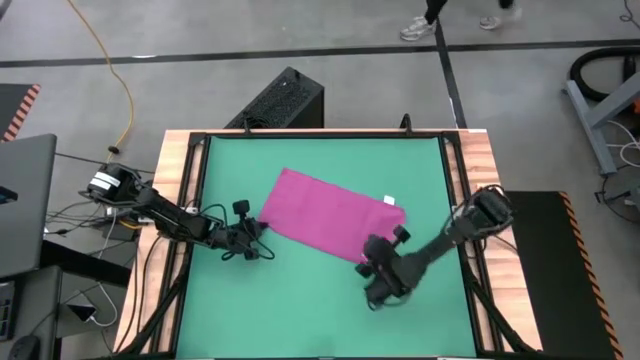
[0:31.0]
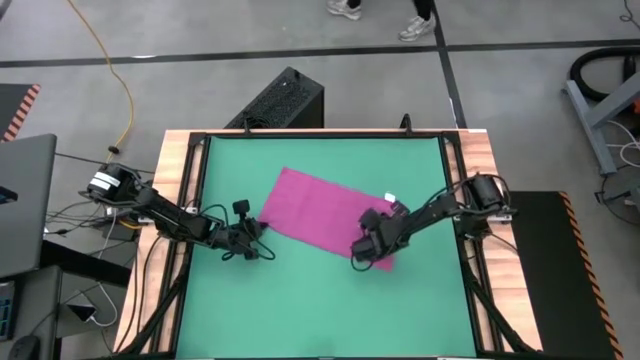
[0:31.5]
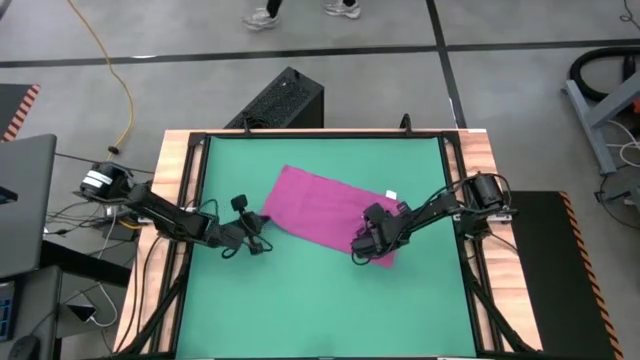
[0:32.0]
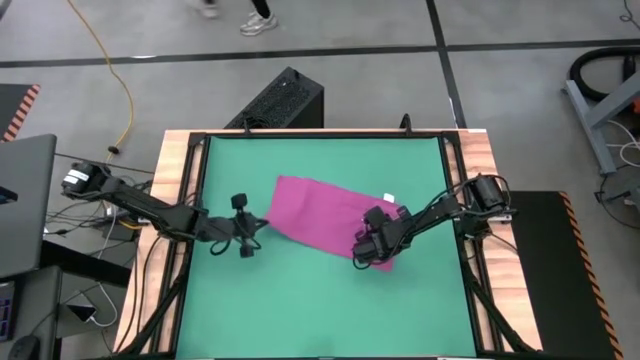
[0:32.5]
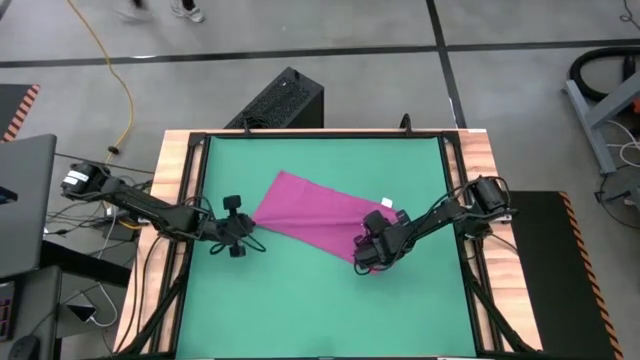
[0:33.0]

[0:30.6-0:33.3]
Task: Roll towel into tight, uniform cylinder
Roll the pink towel

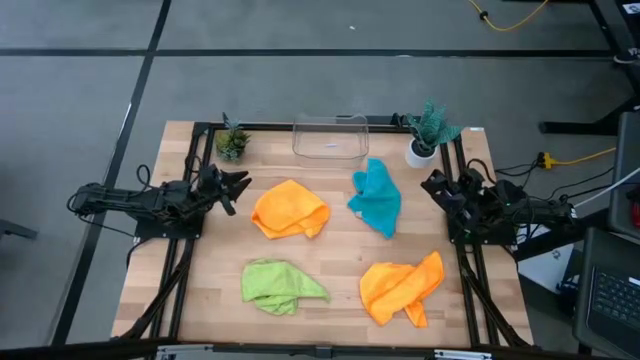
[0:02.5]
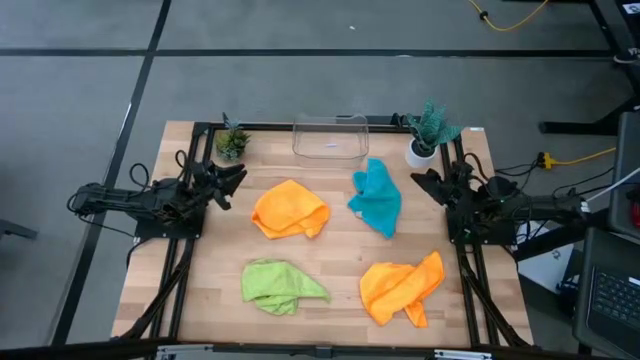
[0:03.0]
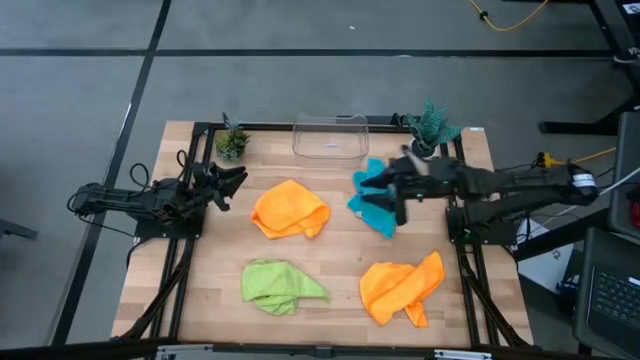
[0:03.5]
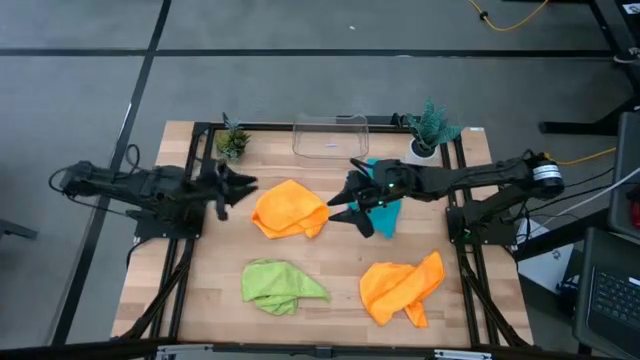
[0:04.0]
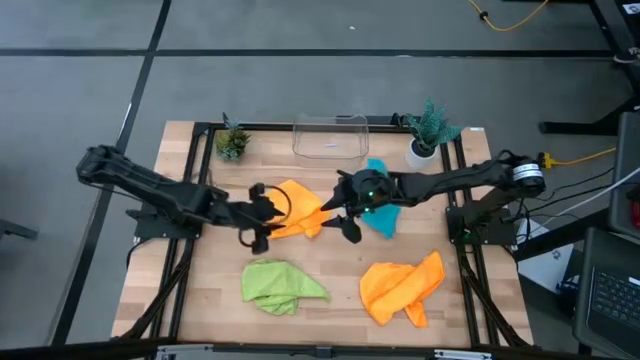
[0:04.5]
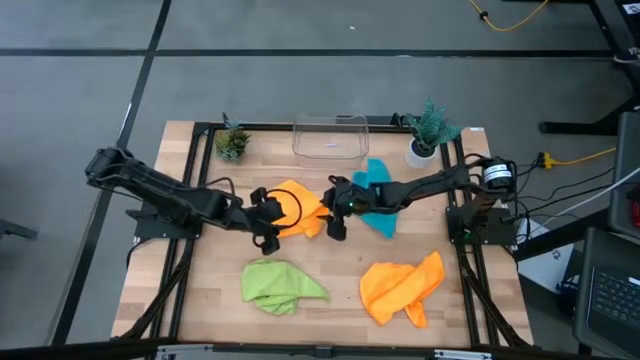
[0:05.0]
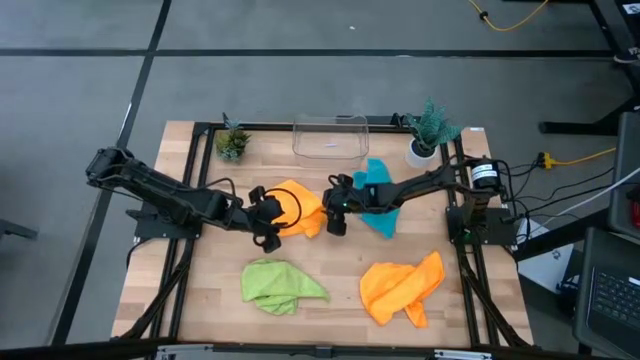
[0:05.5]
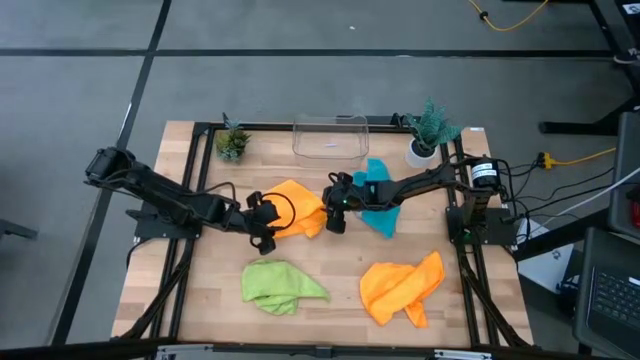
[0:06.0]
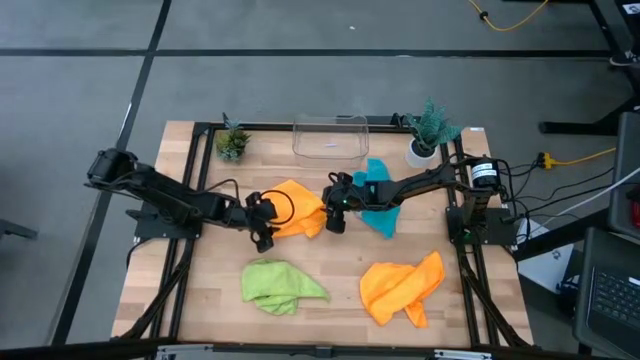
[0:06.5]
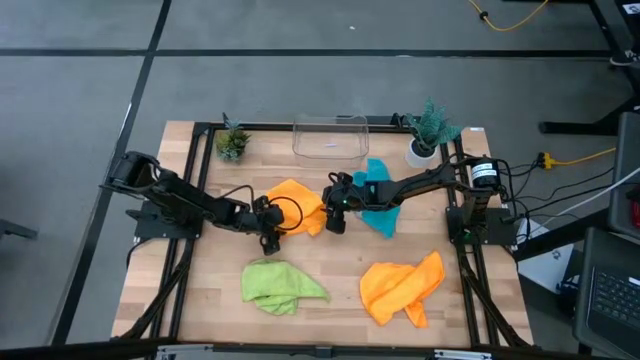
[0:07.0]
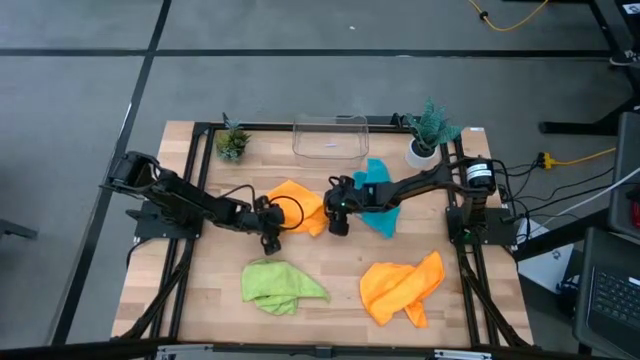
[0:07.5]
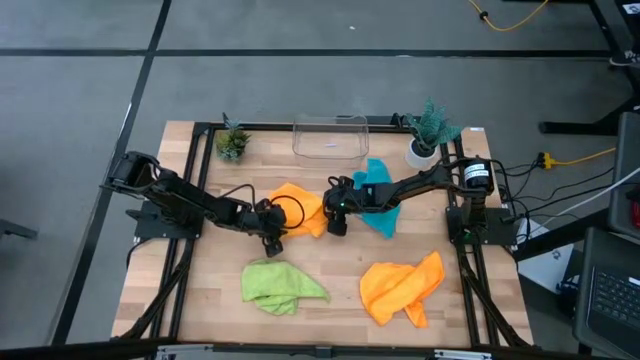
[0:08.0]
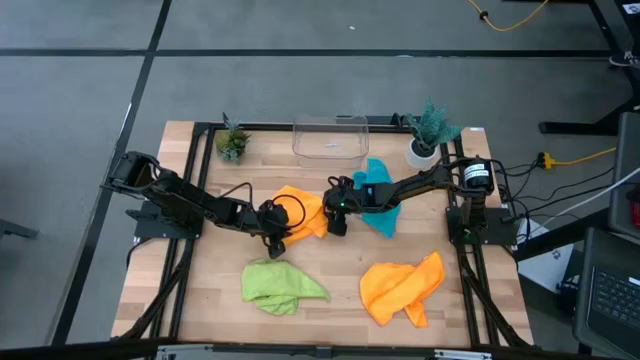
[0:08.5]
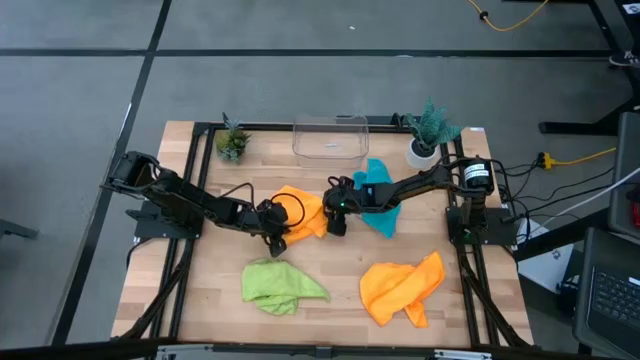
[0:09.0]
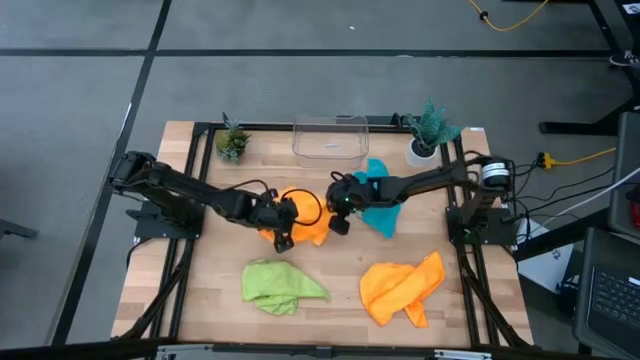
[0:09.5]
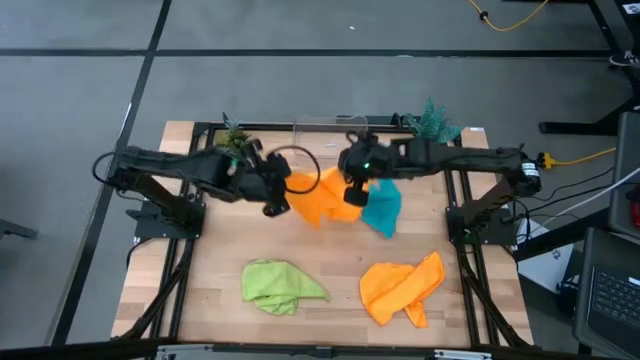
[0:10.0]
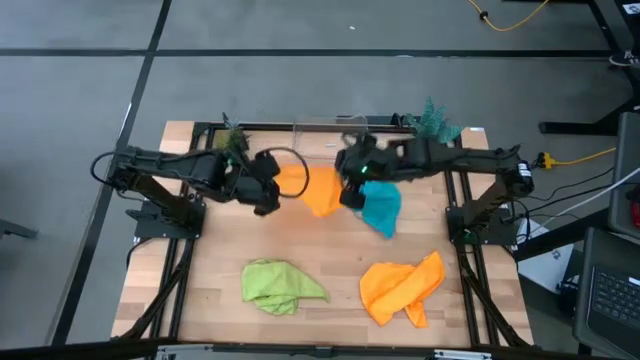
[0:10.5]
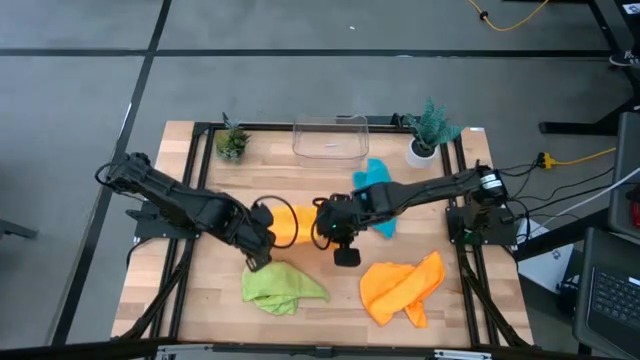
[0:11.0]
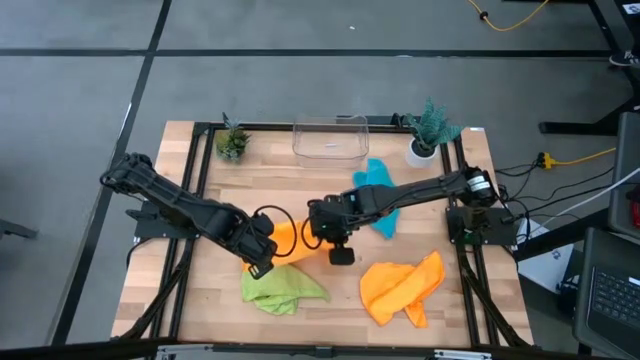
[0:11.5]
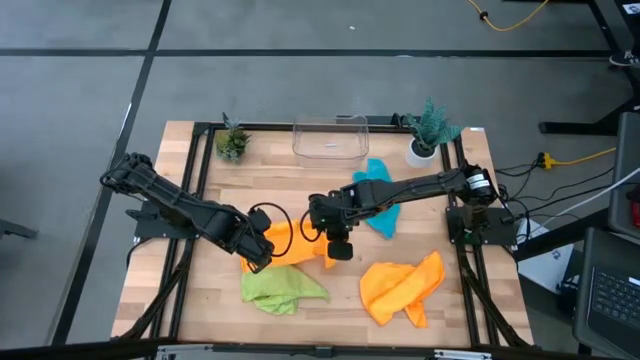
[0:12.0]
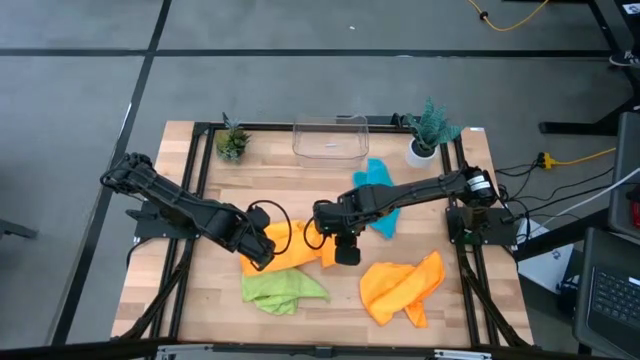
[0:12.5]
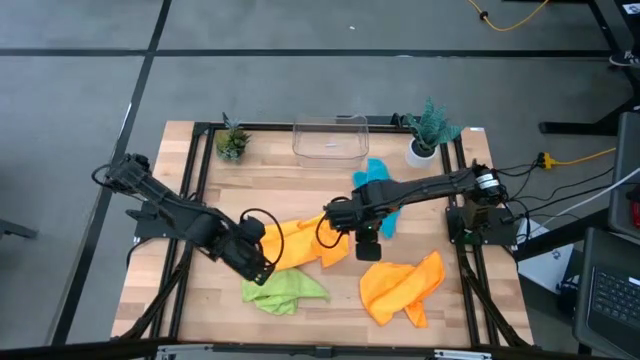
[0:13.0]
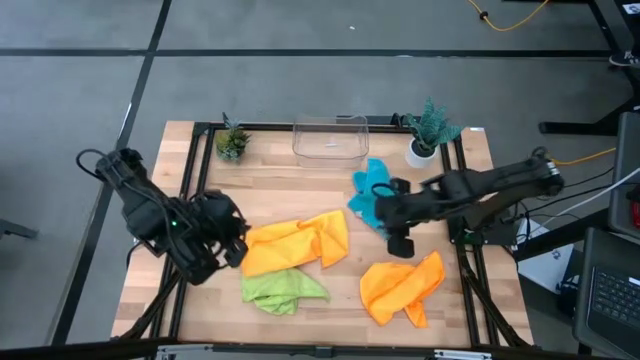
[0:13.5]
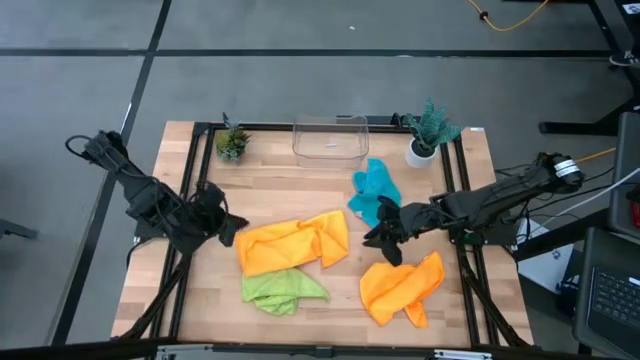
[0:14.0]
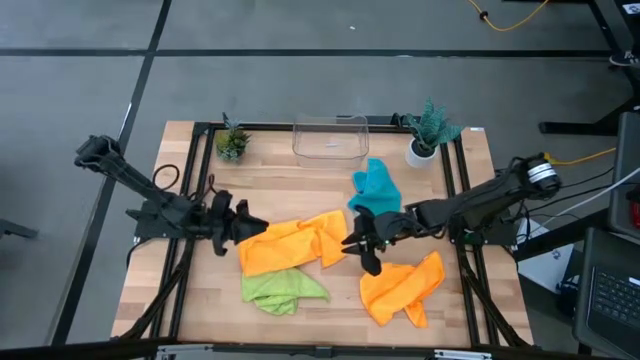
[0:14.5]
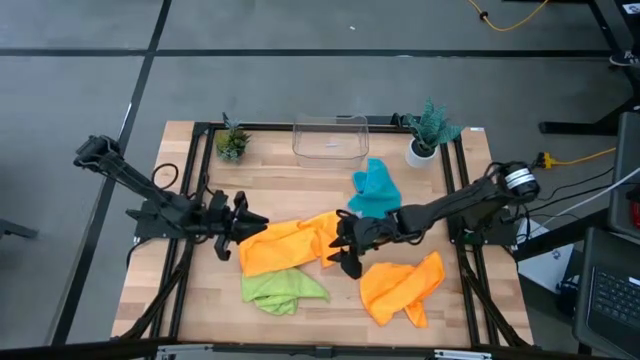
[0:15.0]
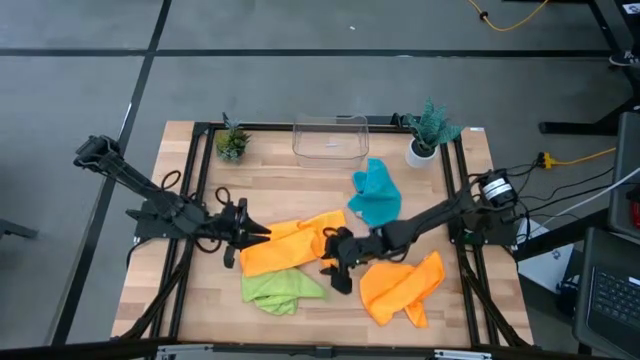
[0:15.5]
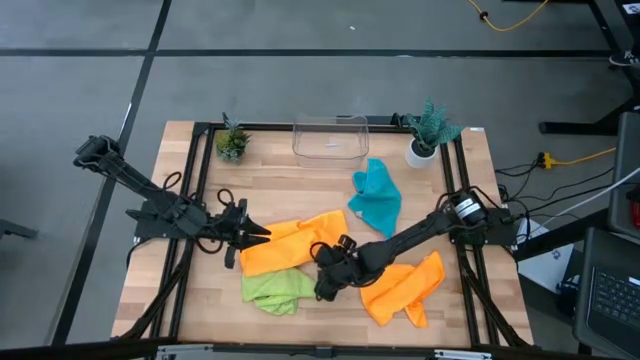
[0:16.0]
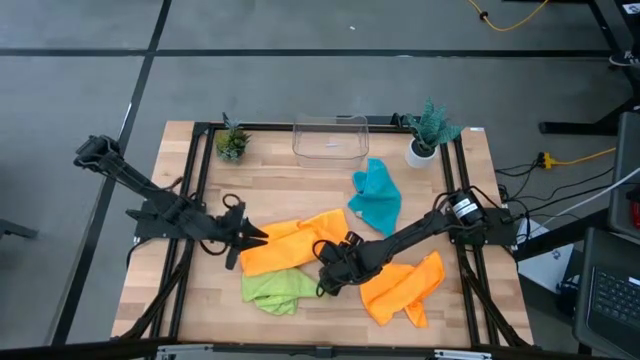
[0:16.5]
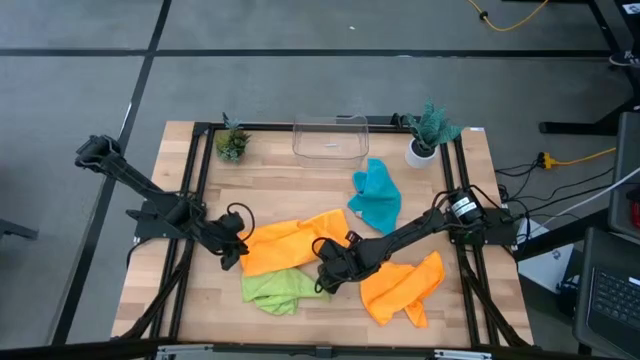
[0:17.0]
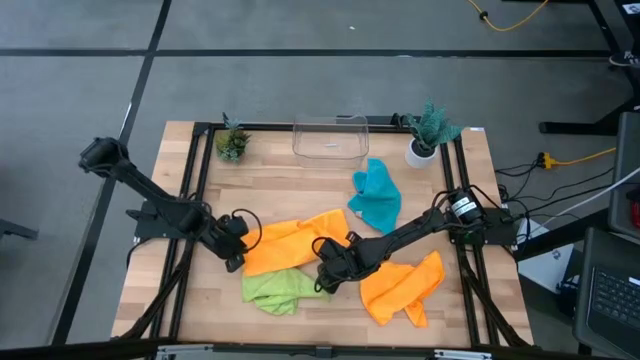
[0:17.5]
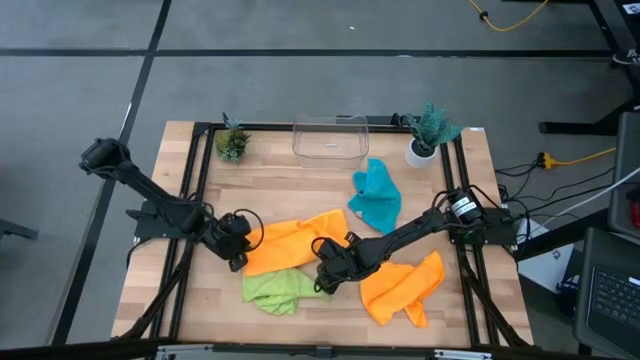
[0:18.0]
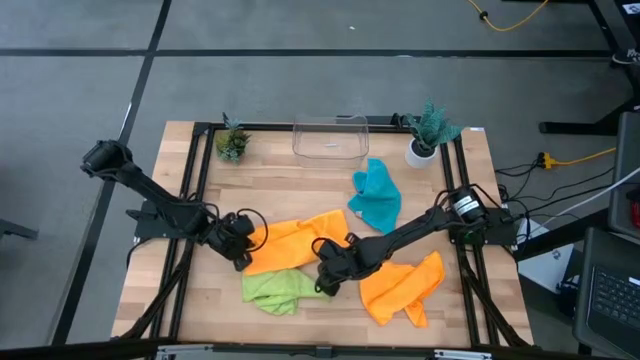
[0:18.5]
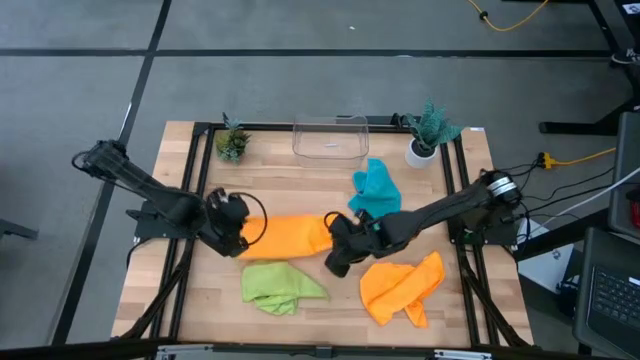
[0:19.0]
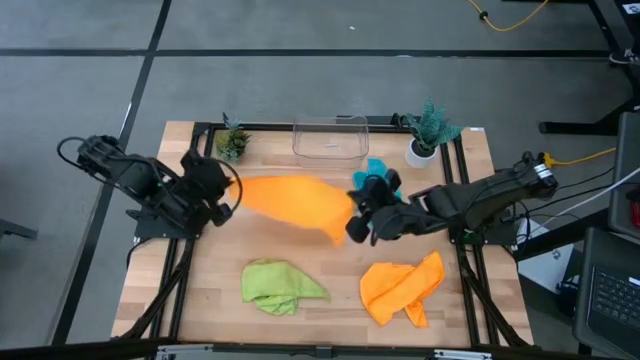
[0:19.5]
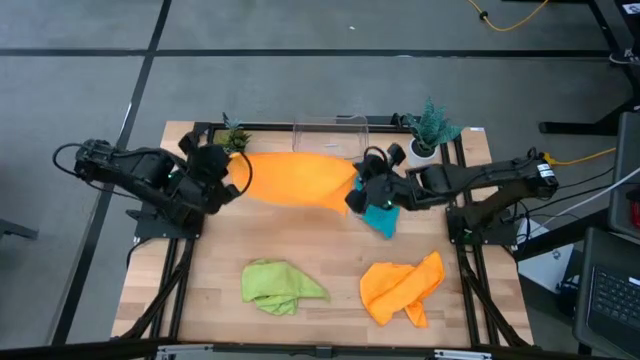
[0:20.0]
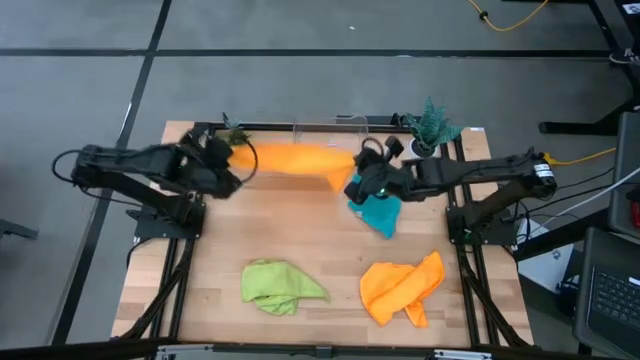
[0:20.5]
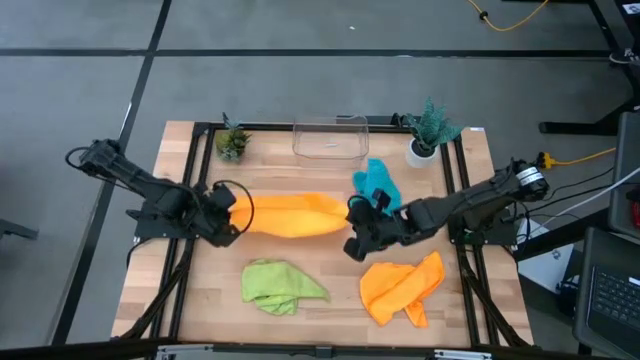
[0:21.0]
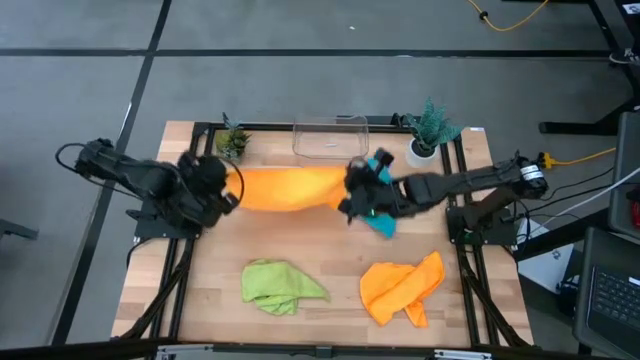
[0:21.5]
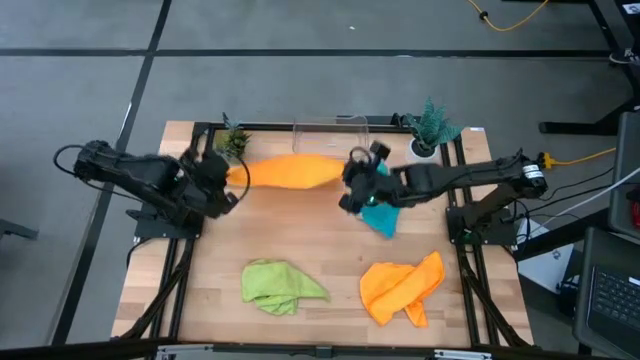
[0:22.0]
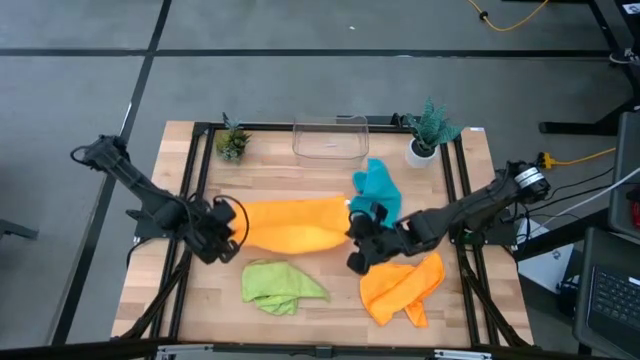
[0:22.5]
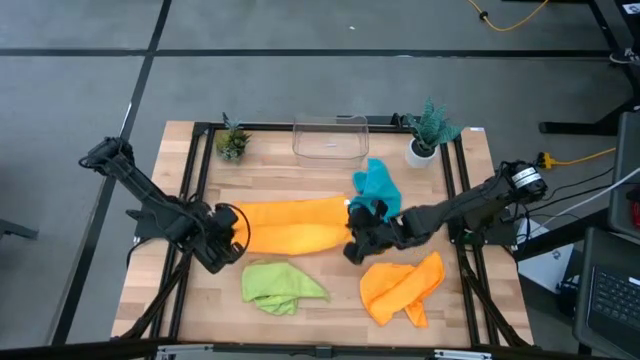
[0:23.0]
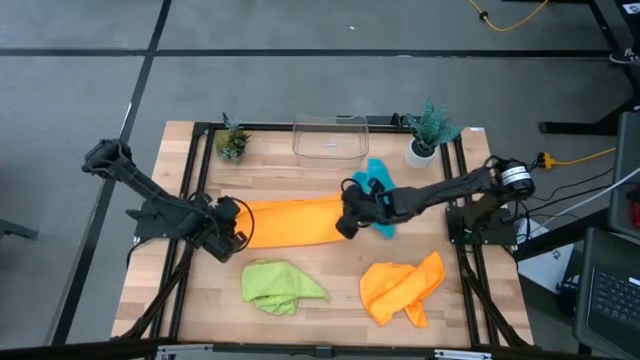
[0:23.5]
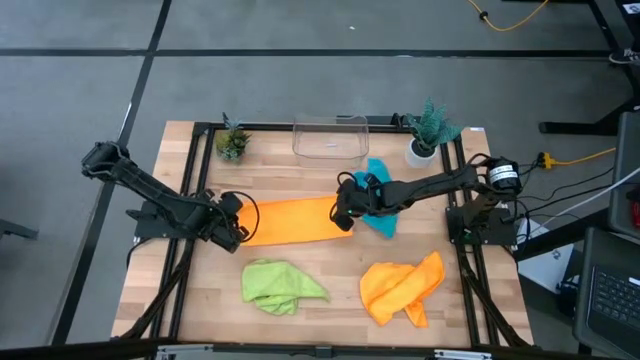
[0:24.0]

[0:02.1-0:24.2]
Task: Fold microfiber towels
Fold the orange towel
